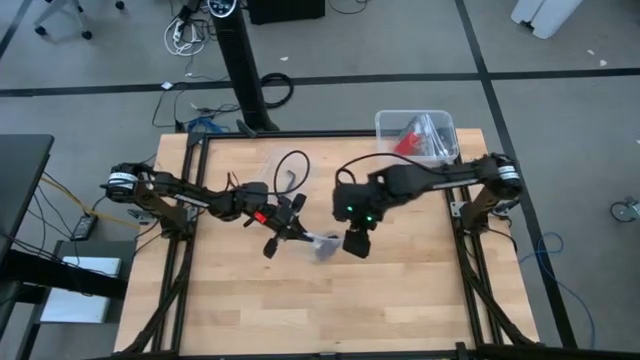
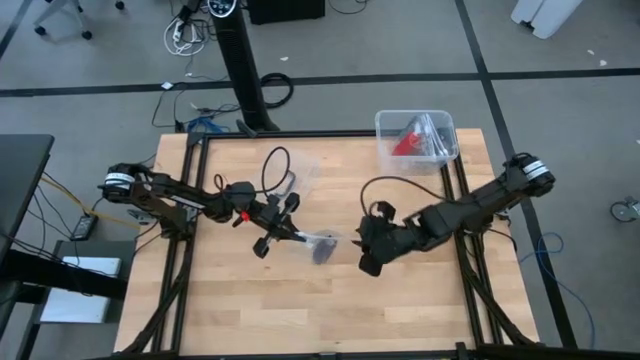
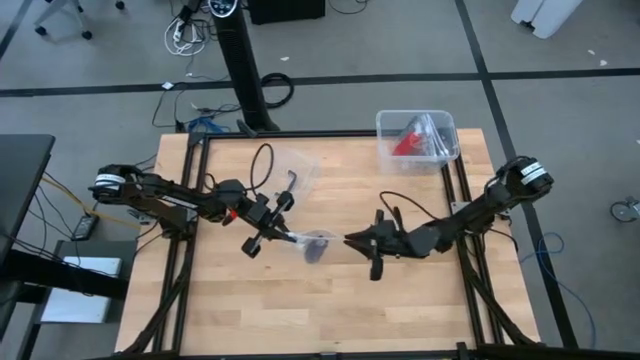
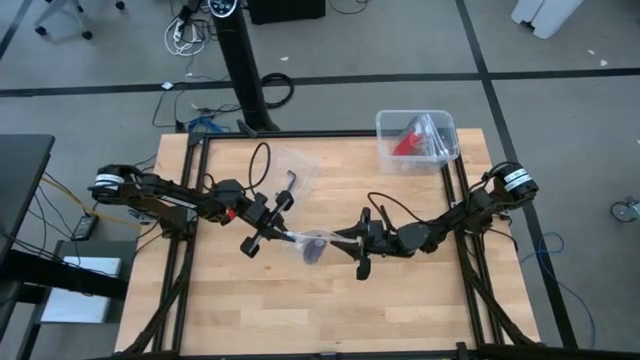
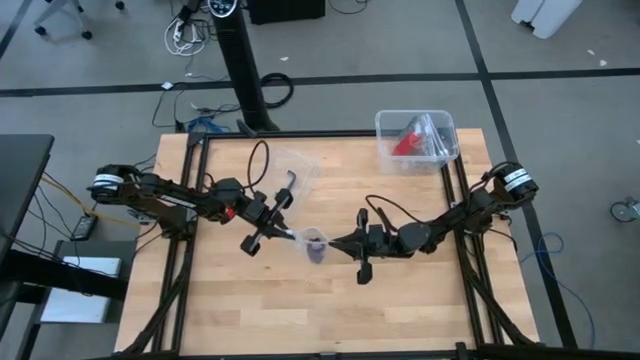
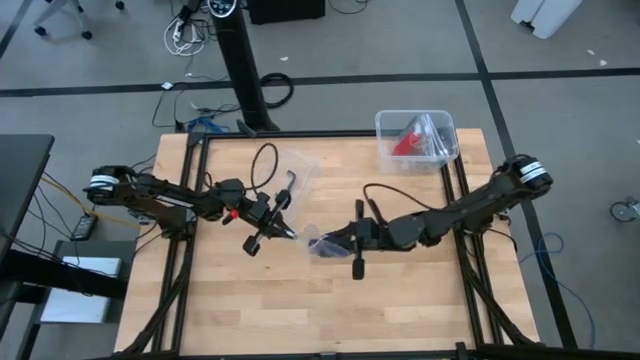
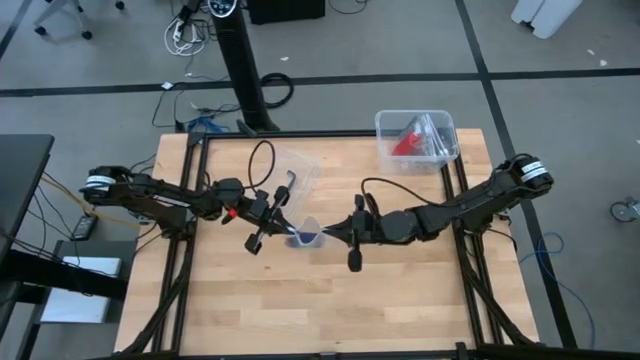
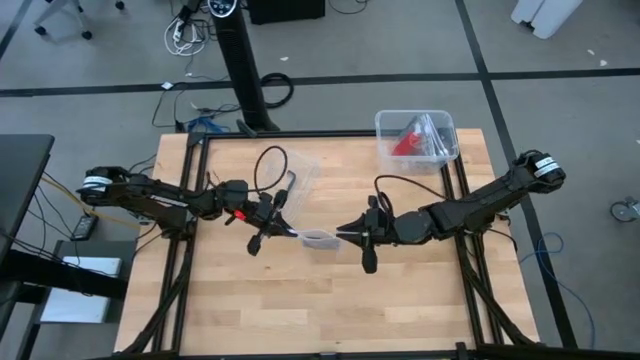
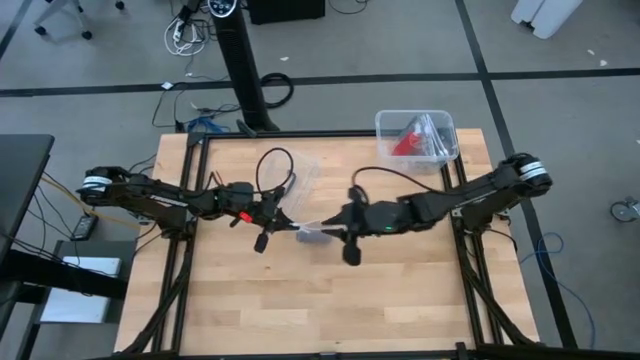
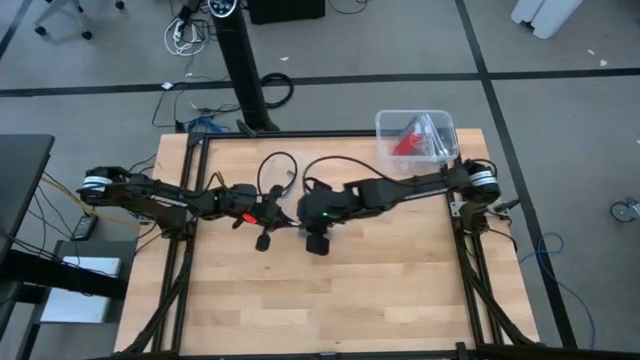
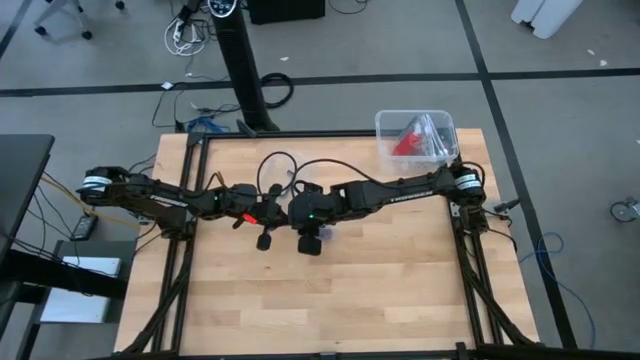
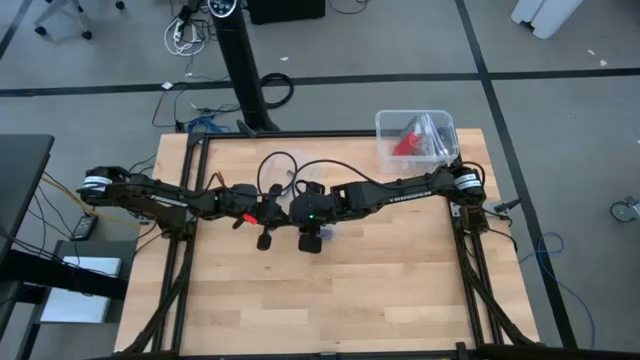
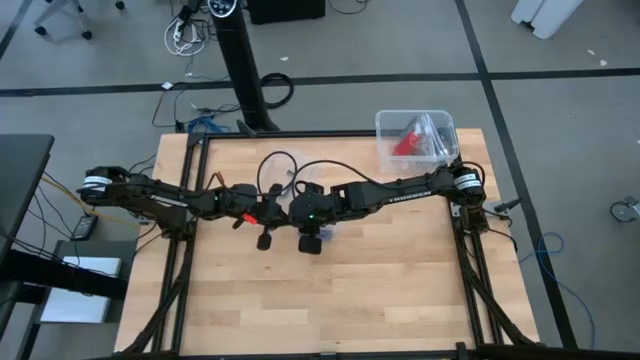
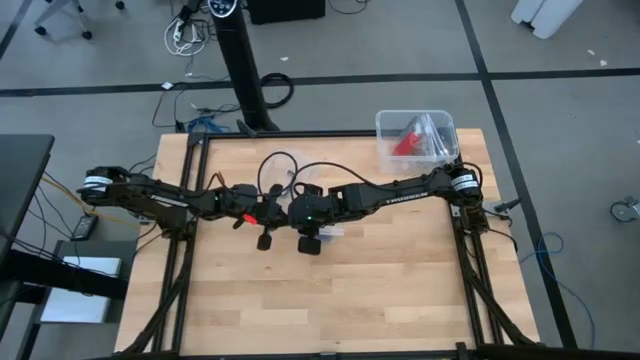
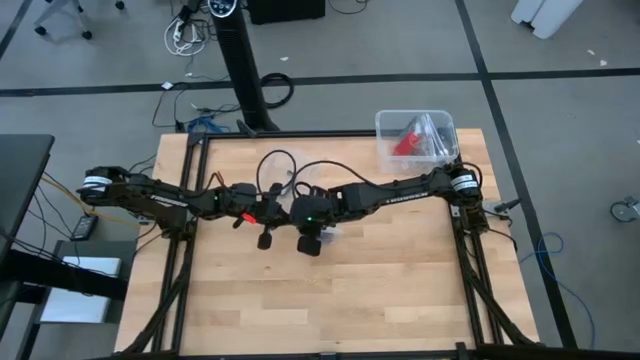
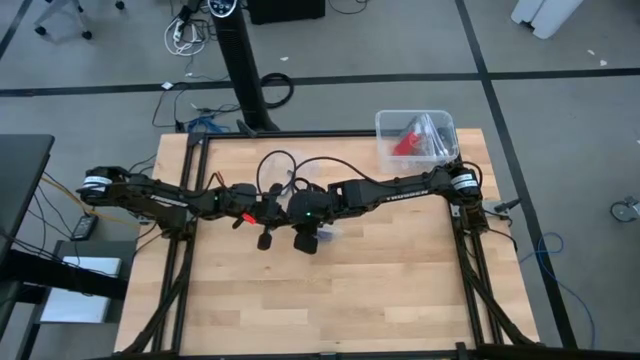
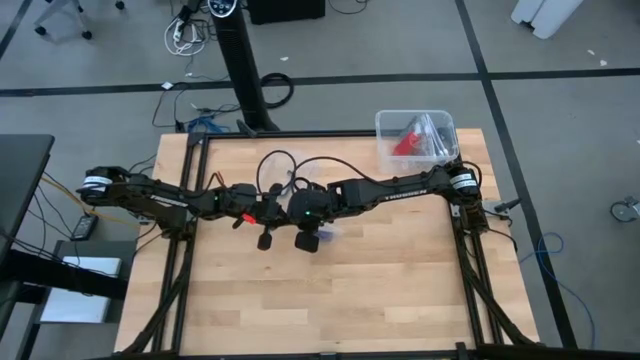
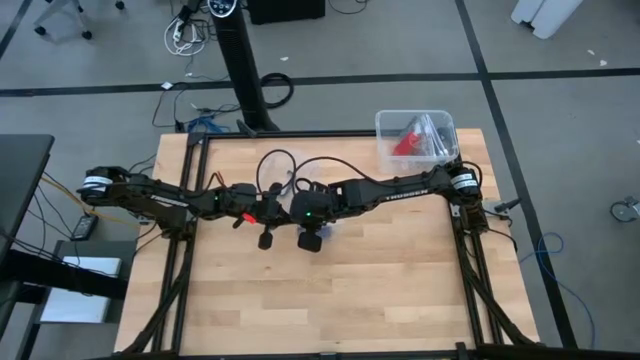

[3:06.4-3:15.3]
Task: Roll bandage
Close the transparent zip bag

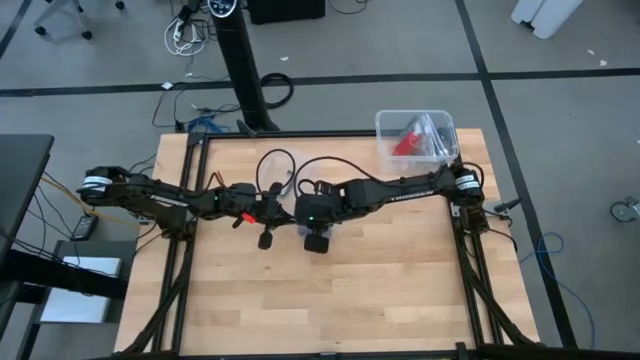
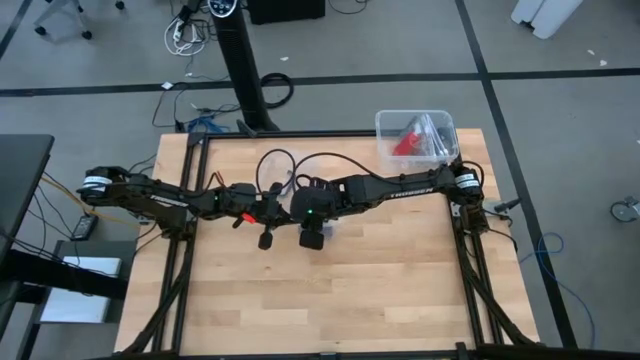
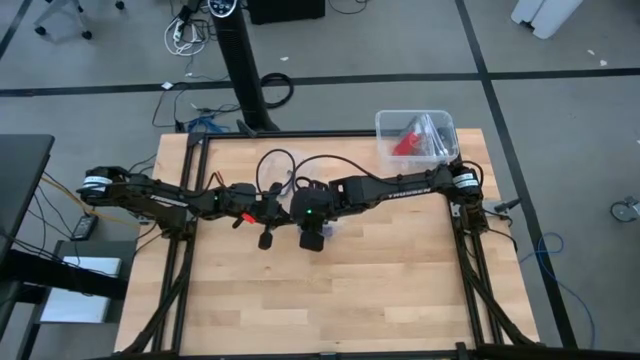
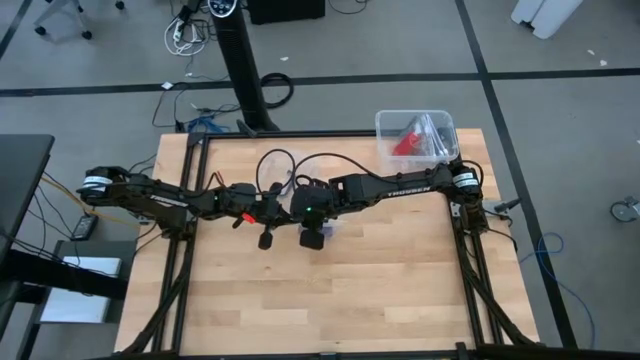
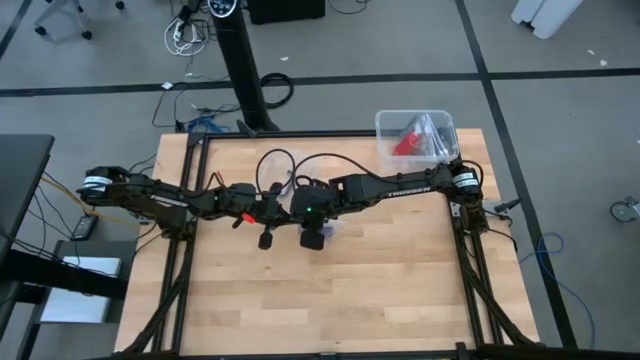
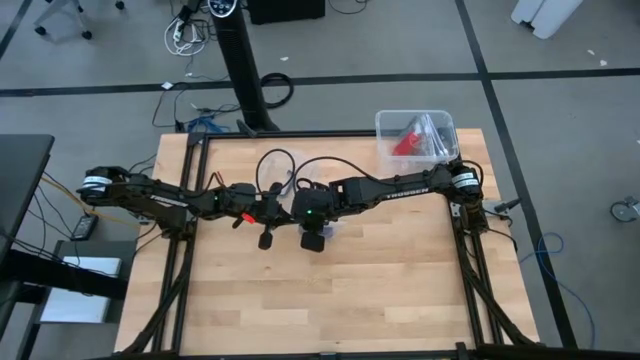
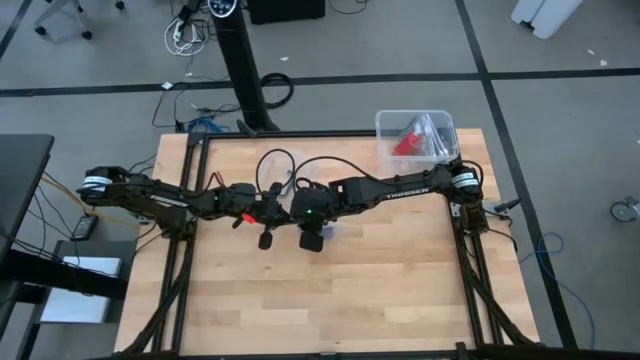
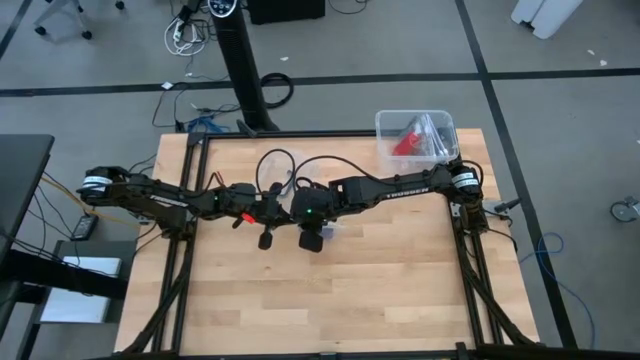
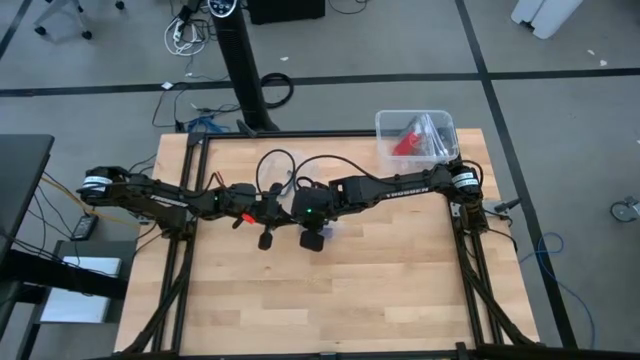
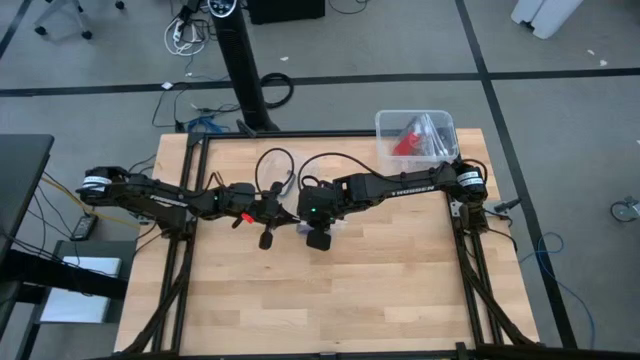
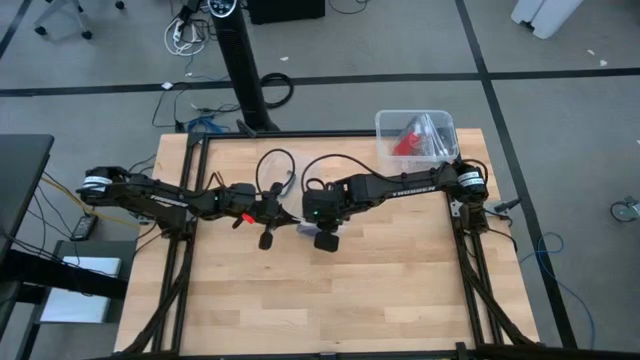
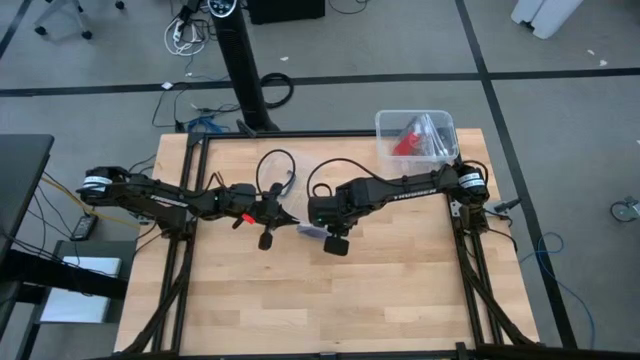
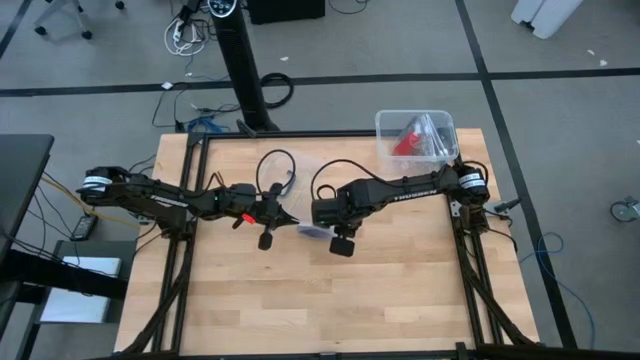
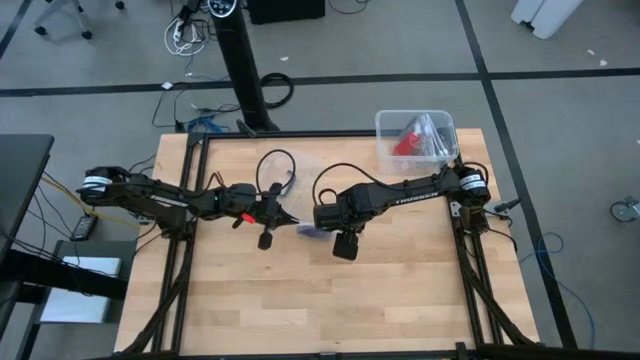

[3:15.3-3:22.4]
Close the transparent zip bag

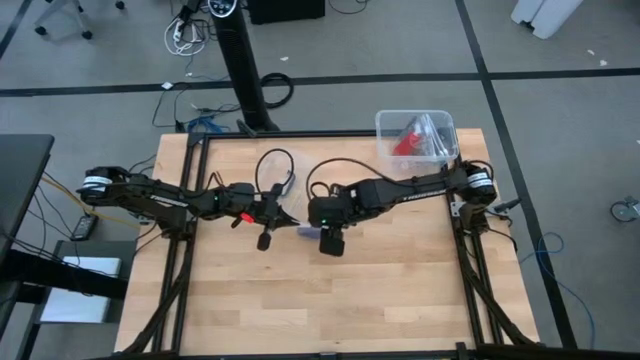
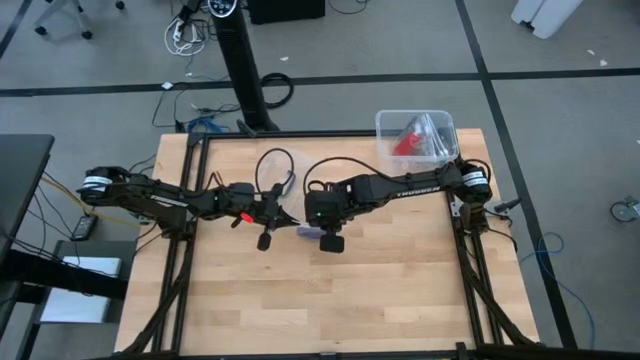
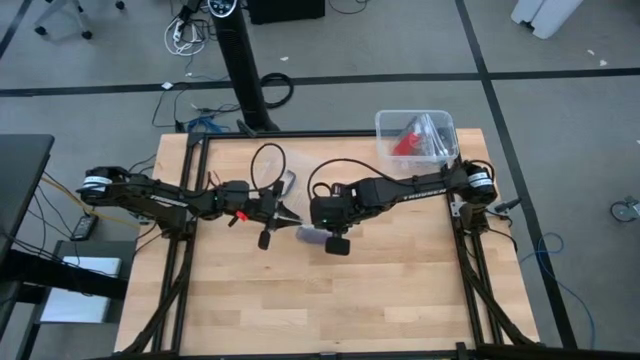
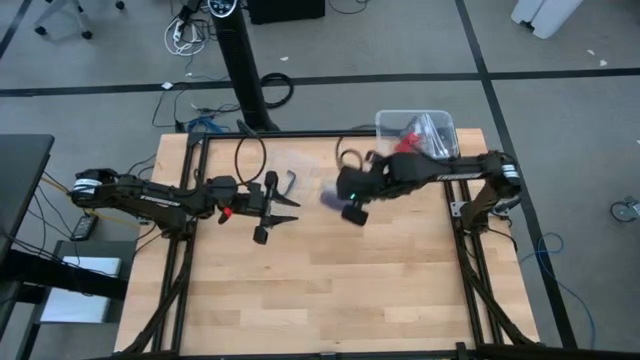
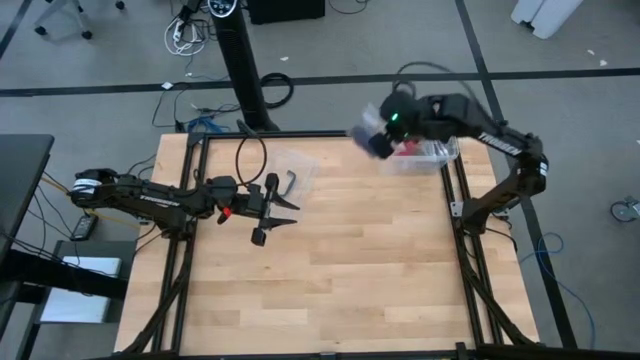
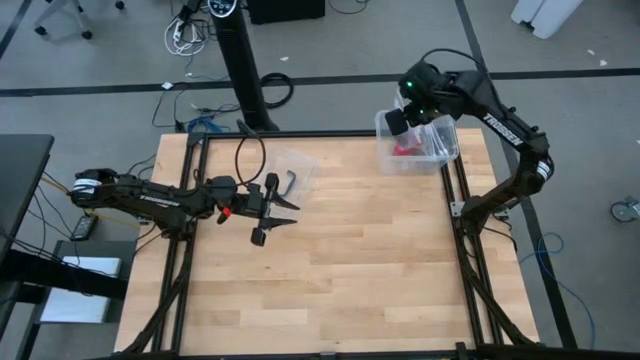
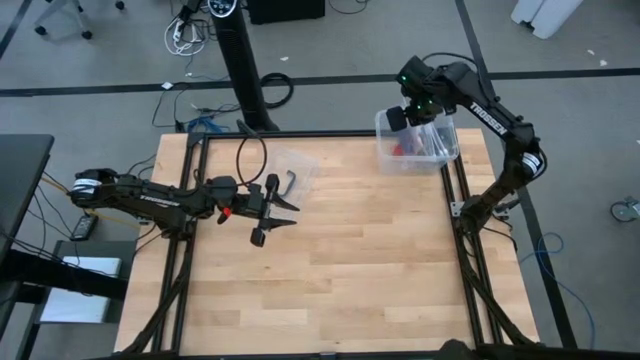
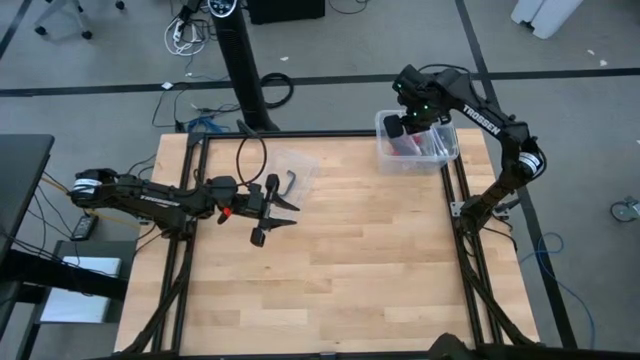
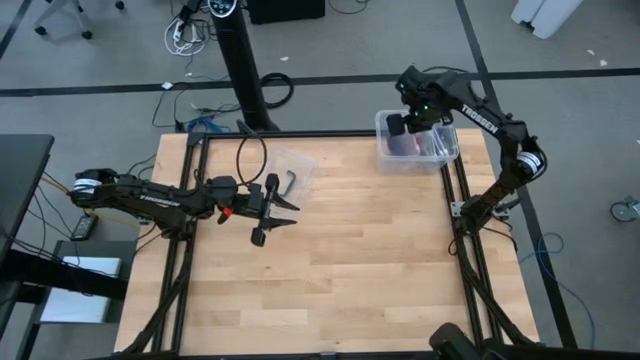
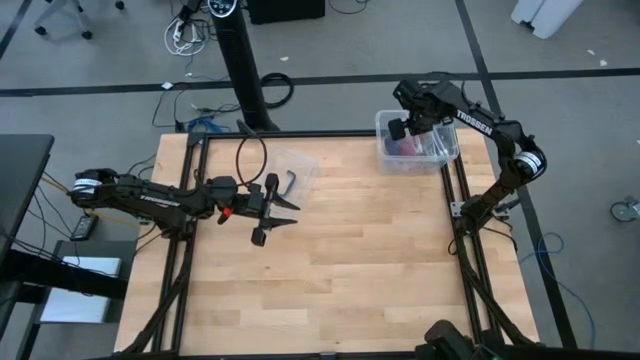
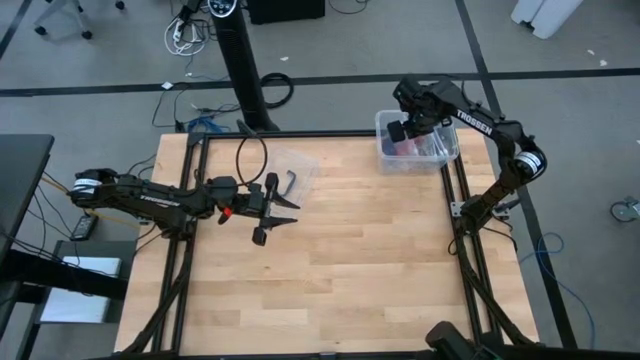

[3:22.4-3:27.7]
Put the transparent zip bag into the transparent bin
